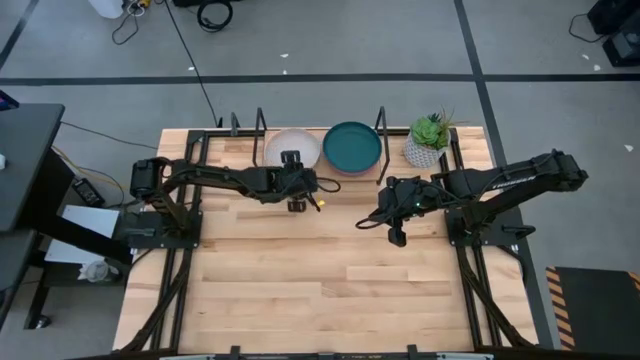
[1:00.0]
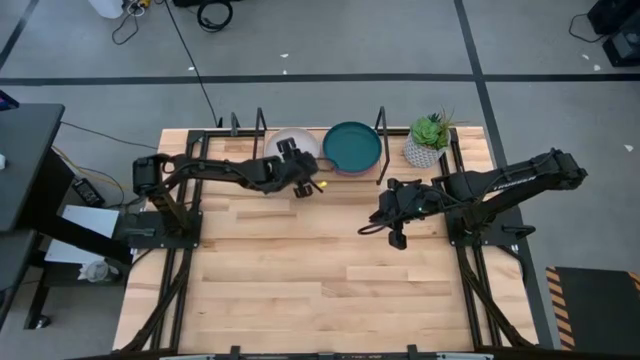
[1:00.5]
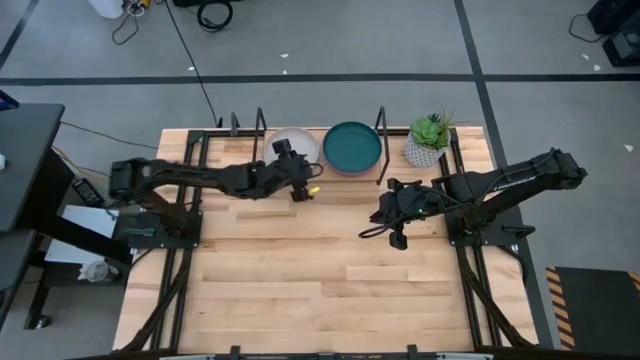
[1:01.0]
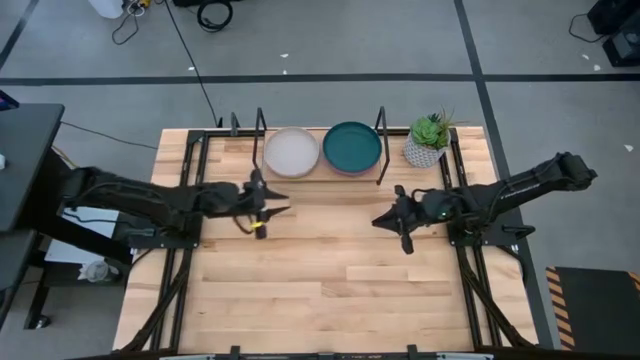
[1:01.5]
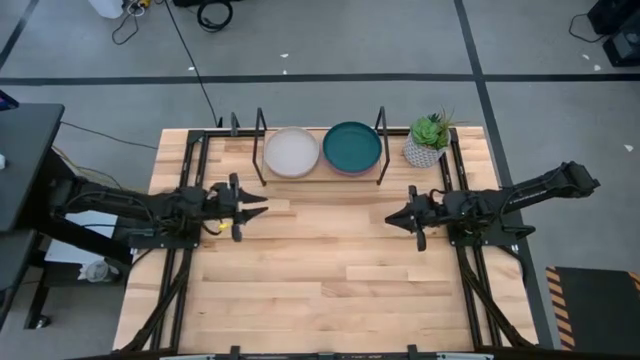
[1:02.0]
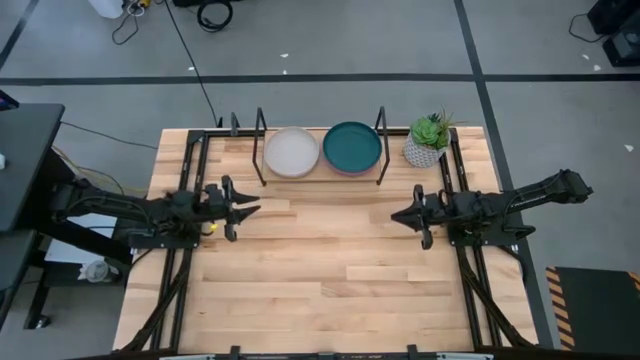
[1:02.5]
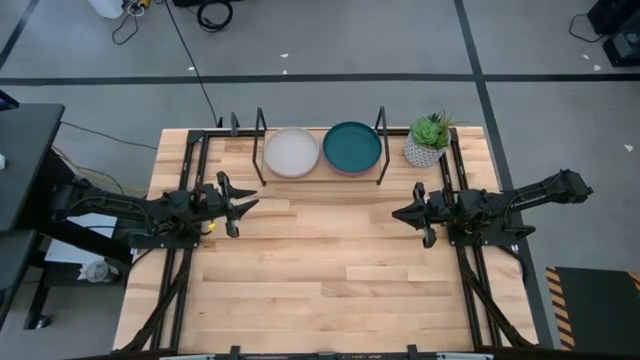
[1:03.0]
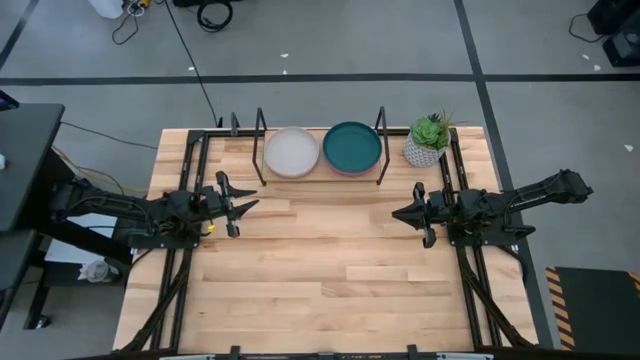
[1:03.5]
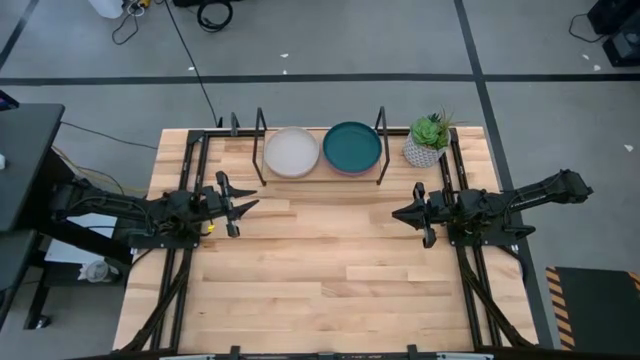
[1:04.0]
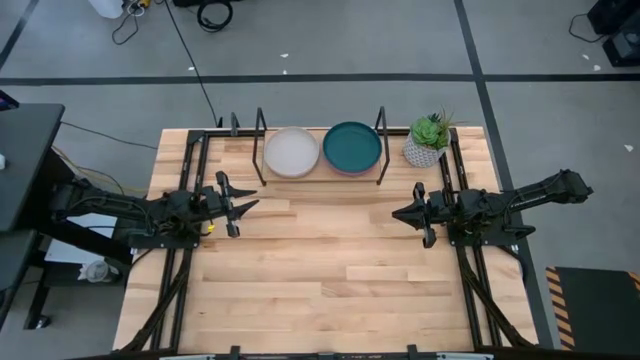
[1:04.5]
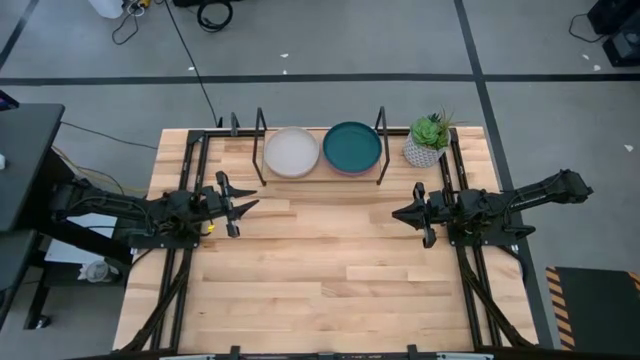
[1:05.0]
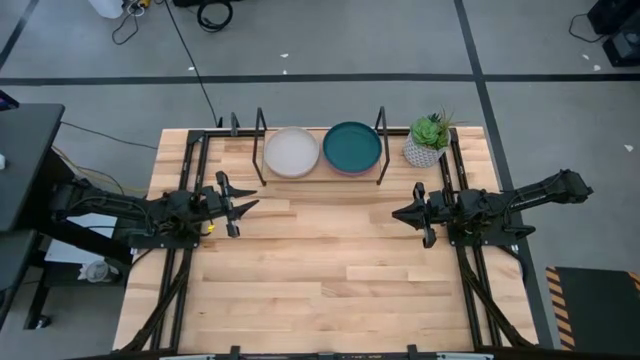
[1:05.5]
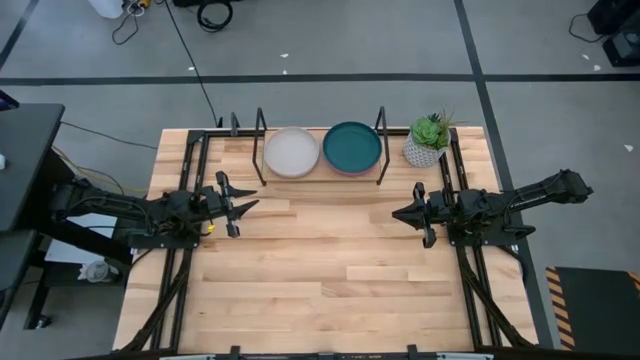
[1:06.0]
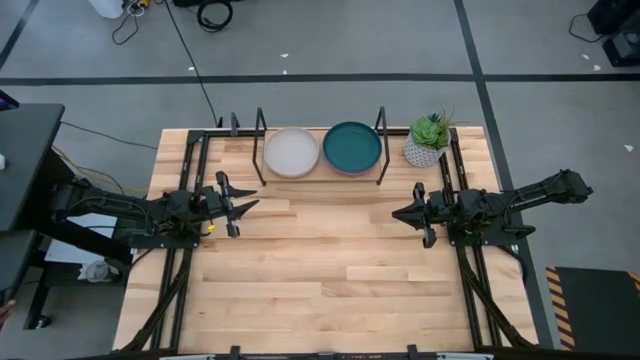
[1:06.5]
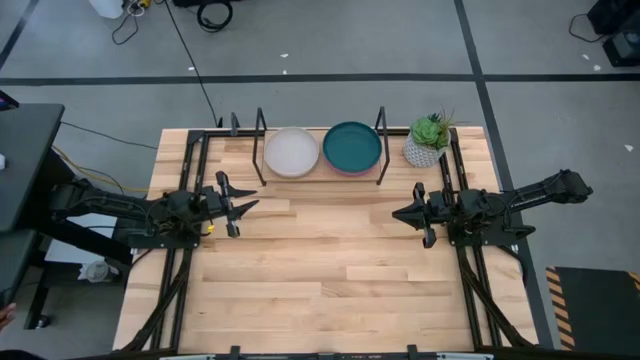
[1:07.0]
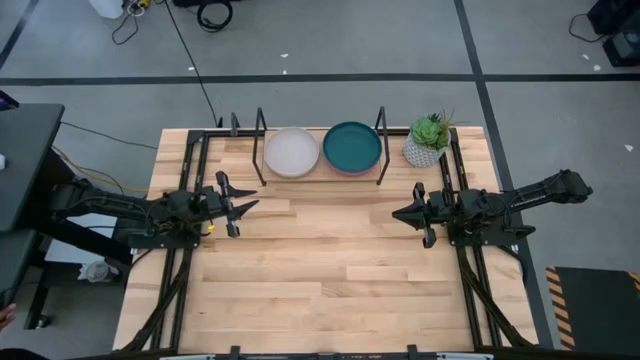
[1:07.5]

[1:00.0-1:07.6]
Task: Place and stack plates onto a shelf
Return to Home Position

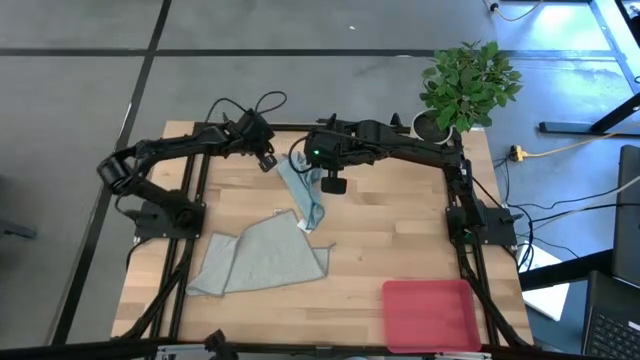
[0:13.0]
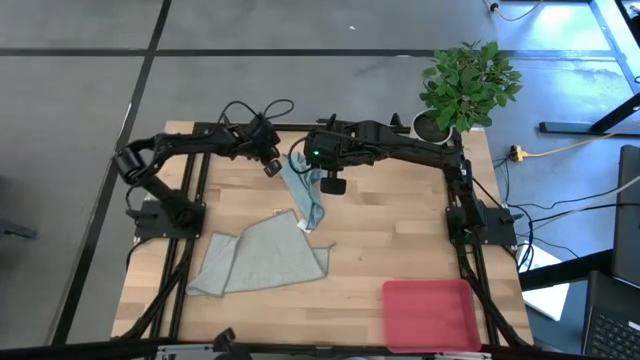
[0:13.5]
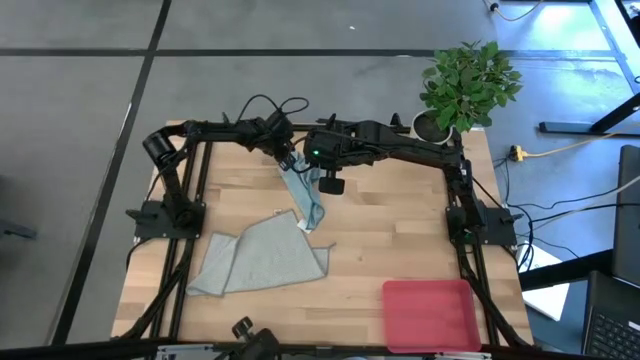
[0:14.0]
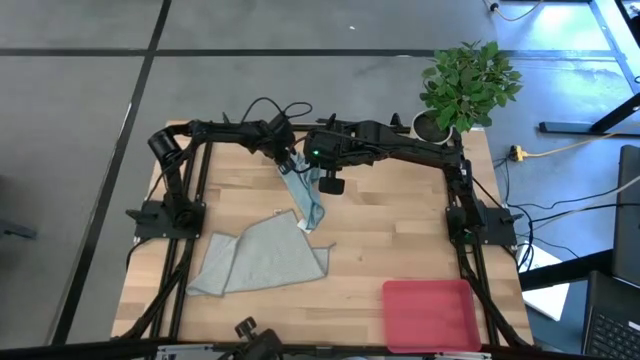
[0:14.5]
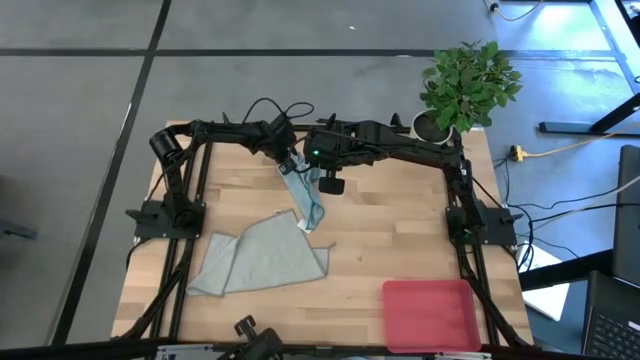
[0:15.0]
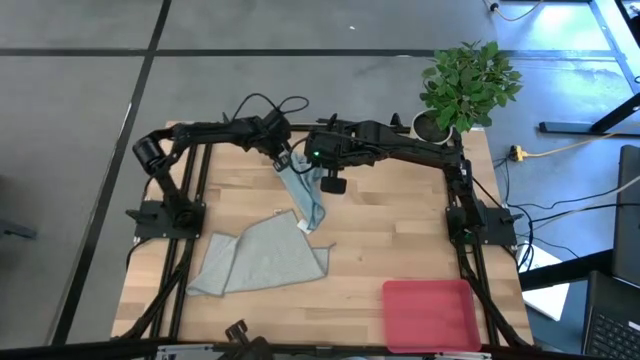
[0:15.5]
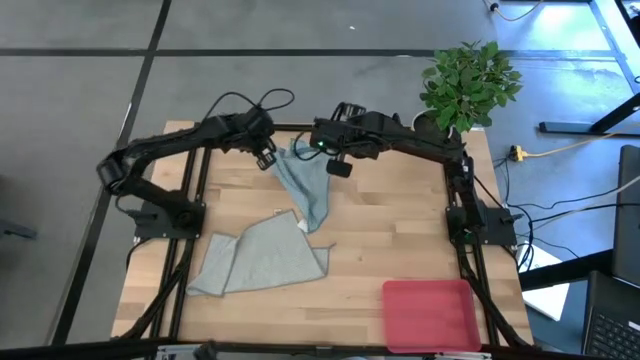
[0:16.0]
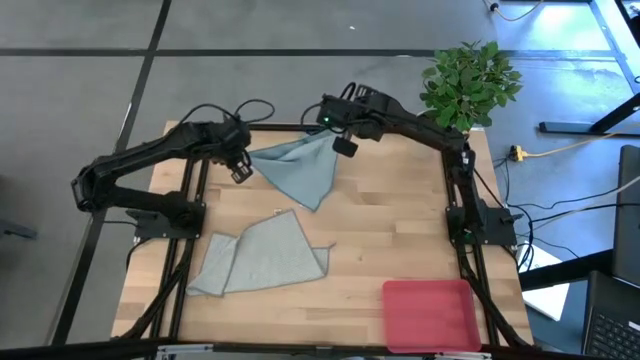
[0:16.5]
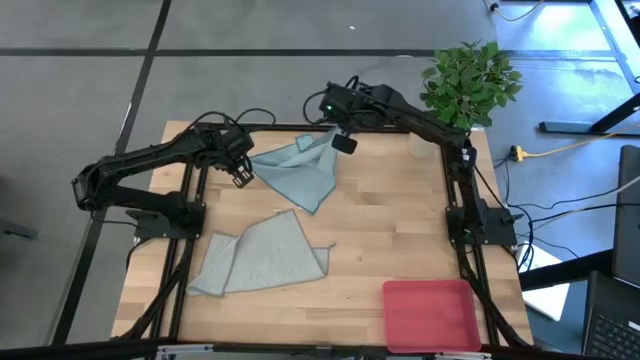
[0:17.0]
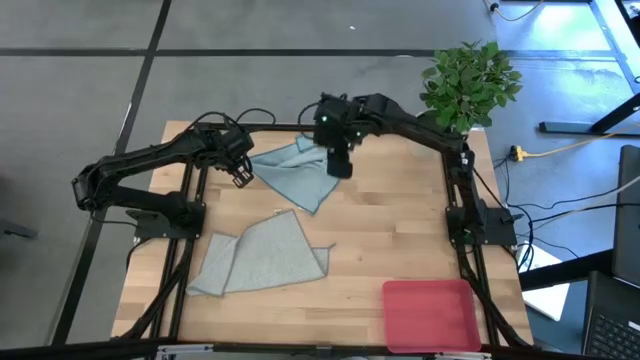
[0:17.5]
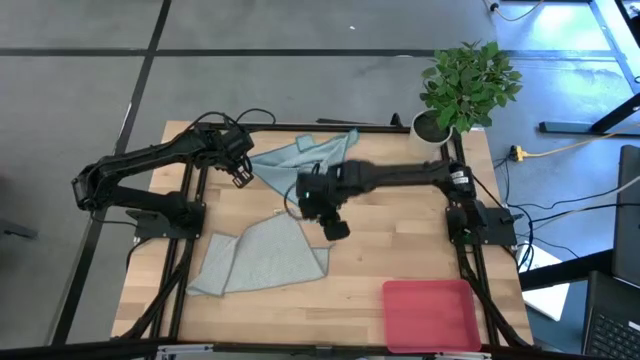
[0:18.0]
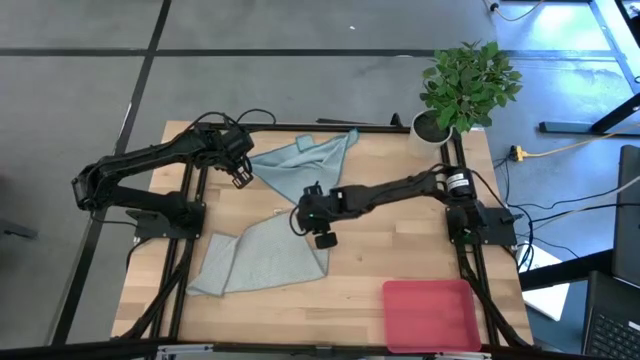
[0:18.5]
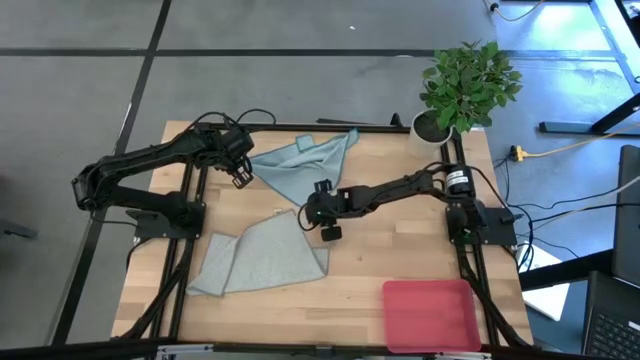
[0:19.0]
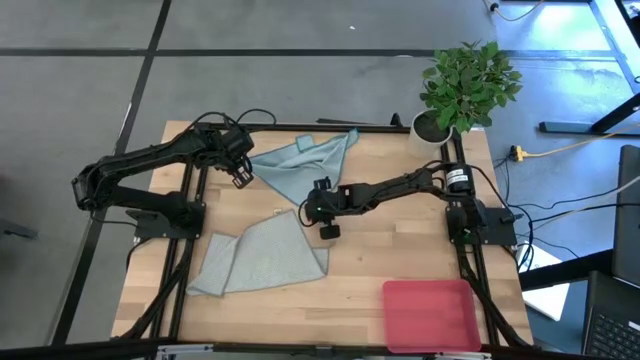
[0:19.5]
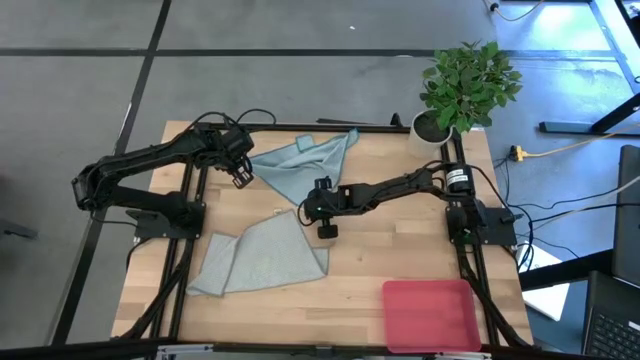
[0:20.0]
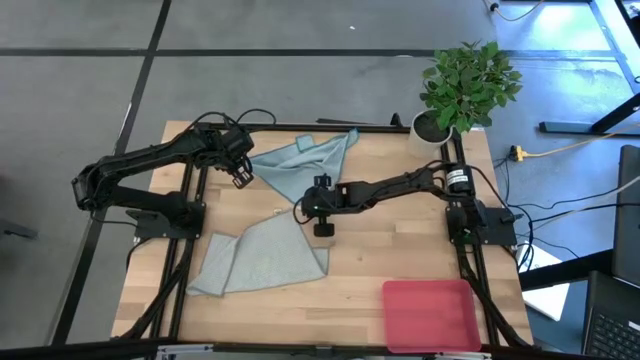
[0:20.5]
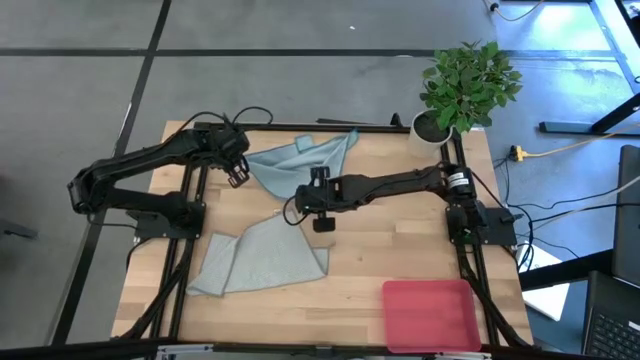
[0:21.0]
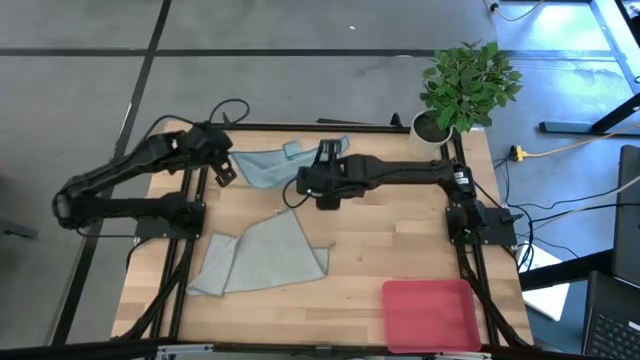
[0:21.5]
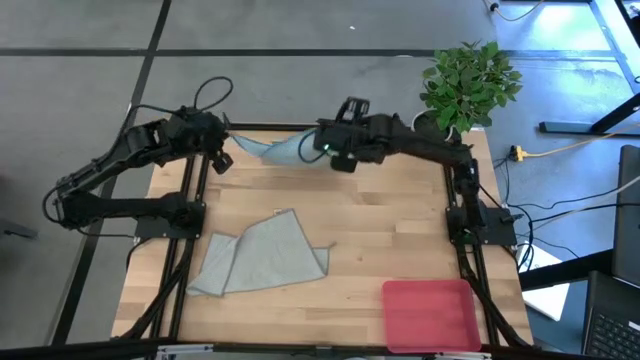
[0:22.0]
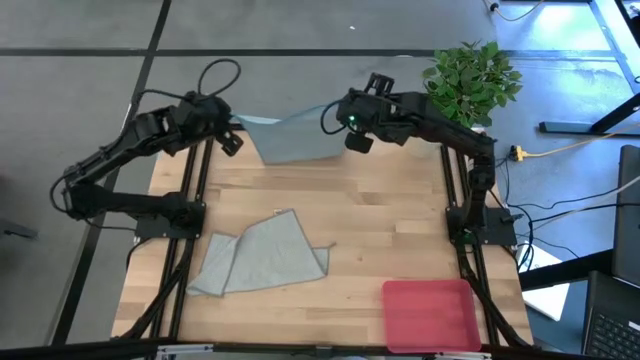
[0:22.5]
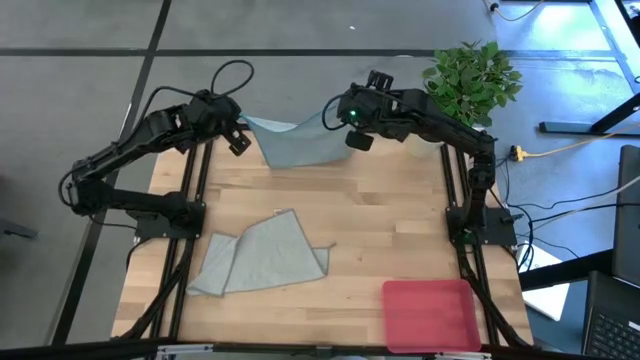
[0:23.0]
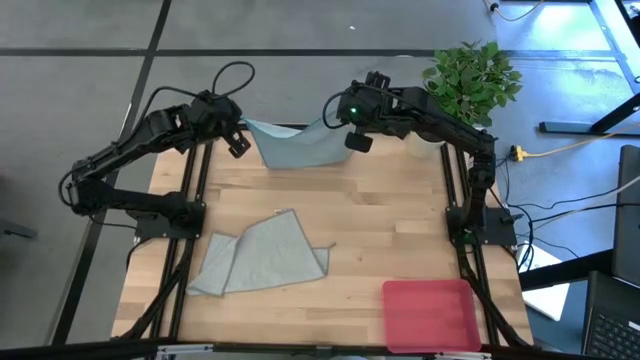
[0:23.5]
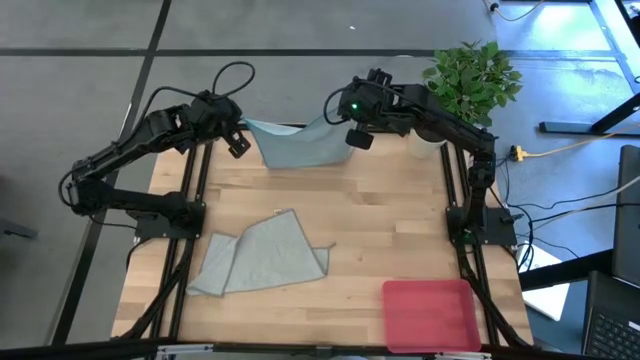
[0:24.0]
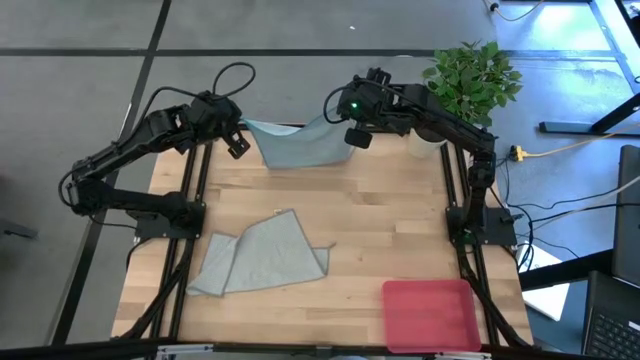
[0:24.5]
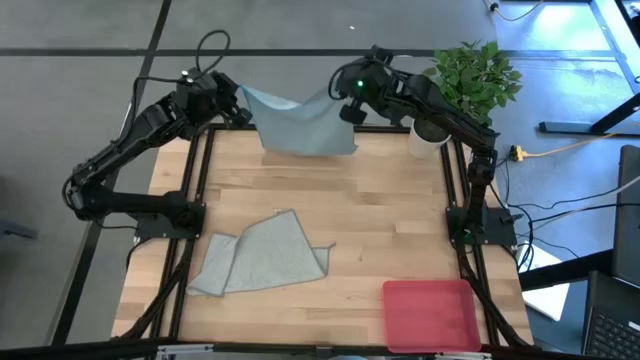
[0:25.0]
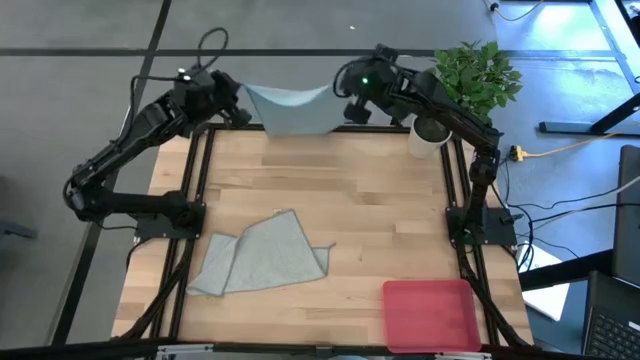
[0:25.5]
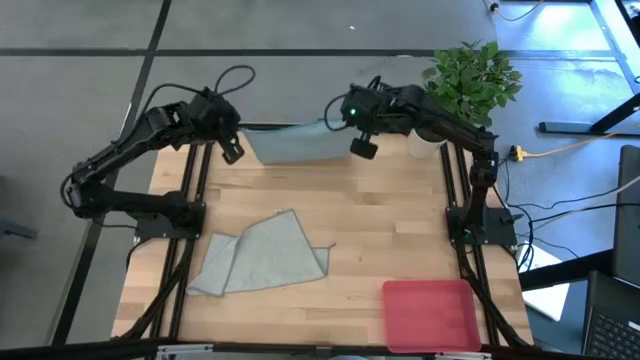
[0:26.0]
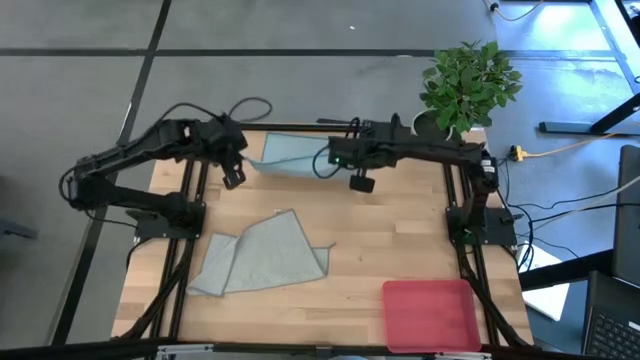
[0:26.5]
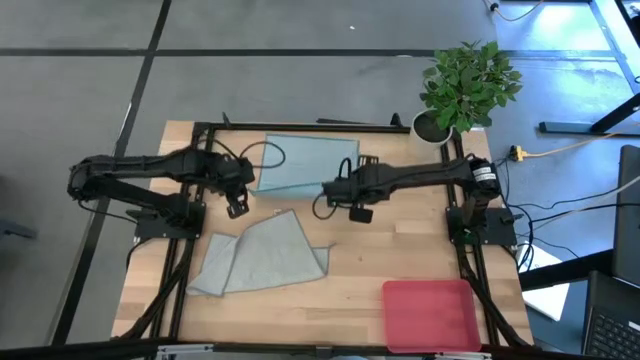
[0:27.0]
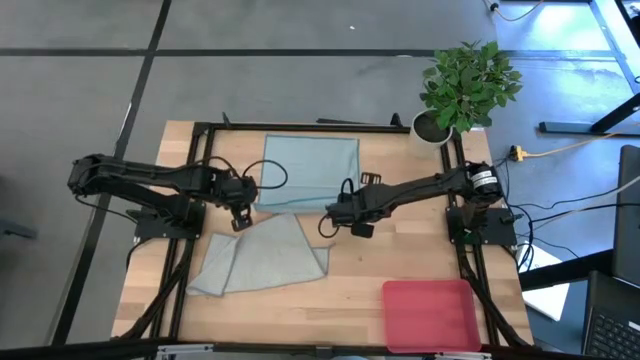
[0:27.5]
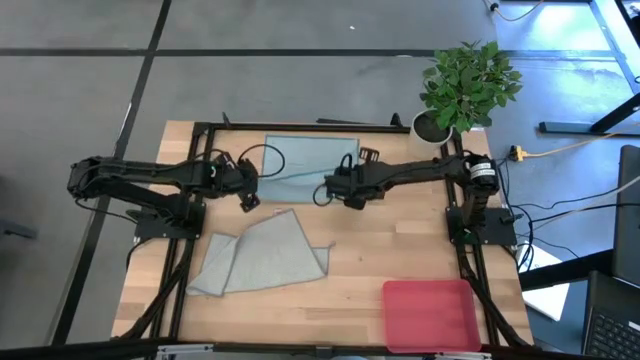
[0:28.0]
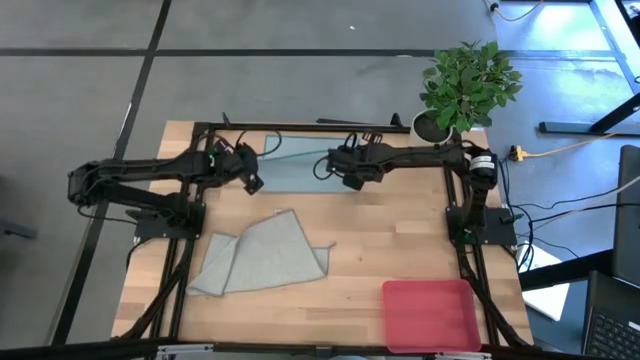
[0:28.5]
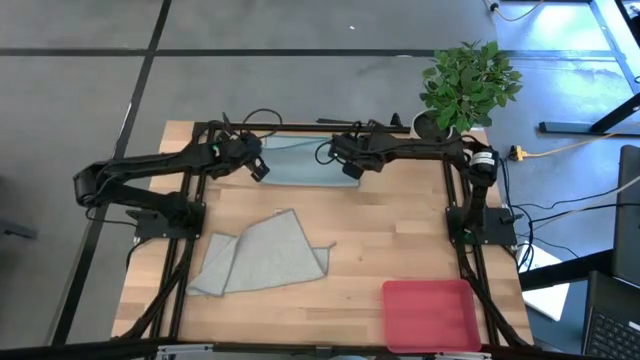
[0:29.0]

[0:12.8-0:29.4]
Task: Roll microfiber towels into tight, uniform cylinder then place into a basket
Fold the blue towel
